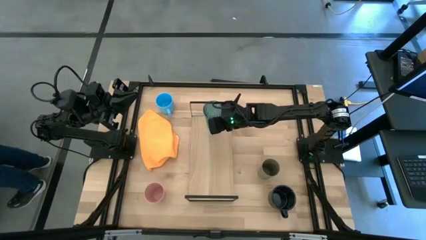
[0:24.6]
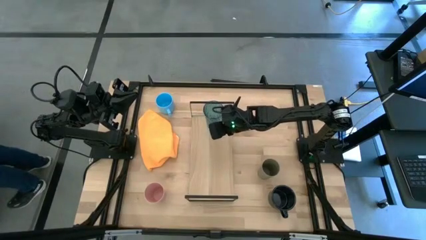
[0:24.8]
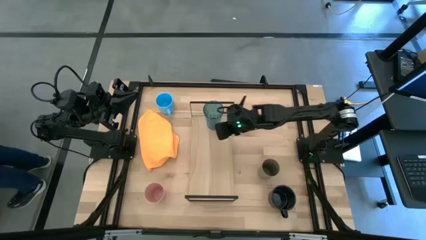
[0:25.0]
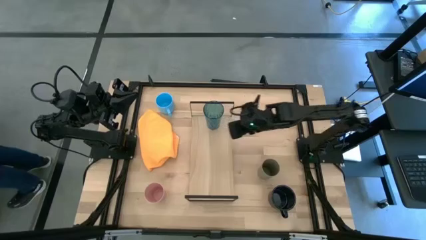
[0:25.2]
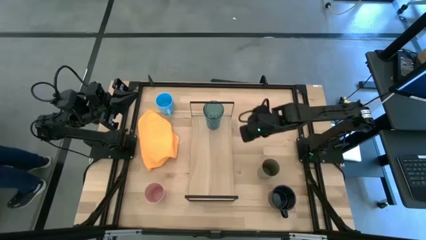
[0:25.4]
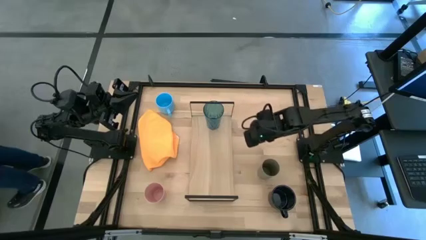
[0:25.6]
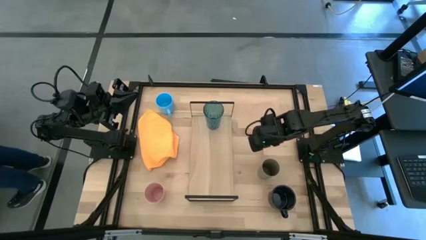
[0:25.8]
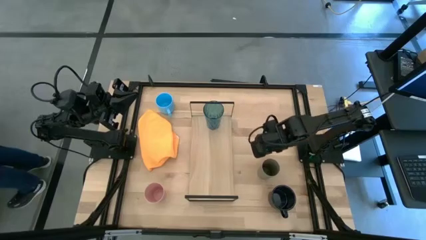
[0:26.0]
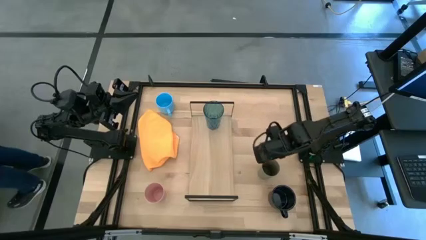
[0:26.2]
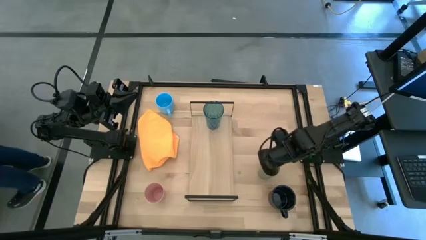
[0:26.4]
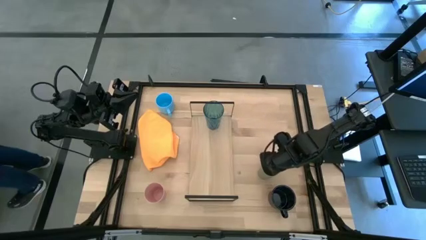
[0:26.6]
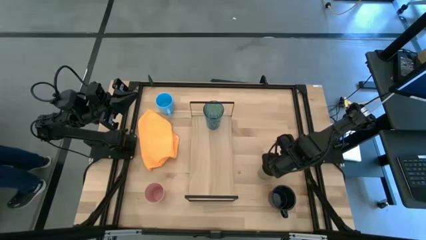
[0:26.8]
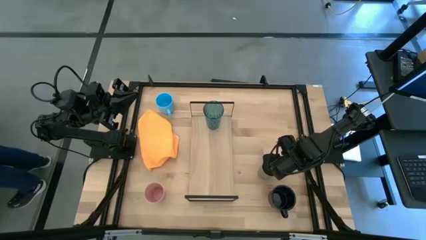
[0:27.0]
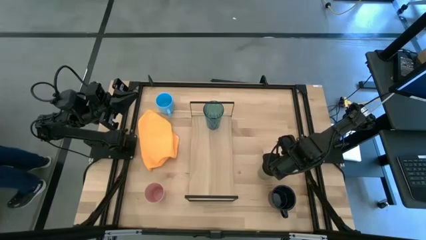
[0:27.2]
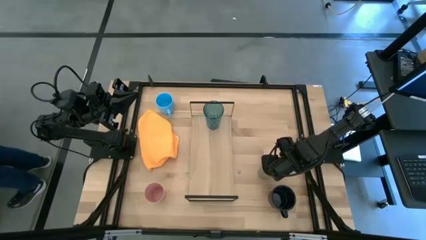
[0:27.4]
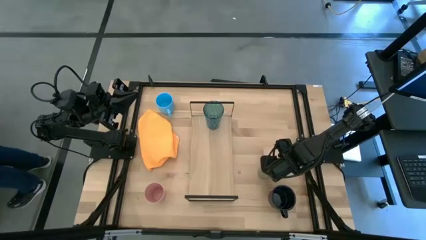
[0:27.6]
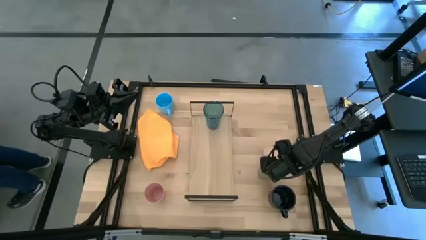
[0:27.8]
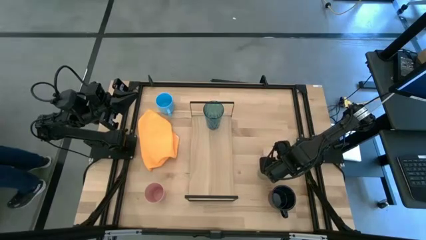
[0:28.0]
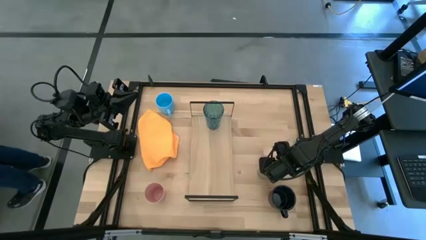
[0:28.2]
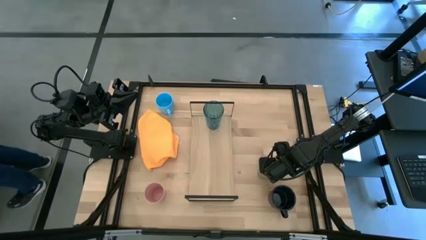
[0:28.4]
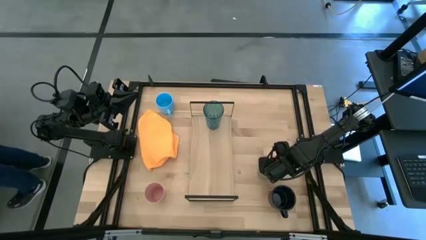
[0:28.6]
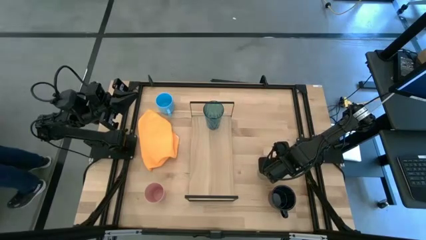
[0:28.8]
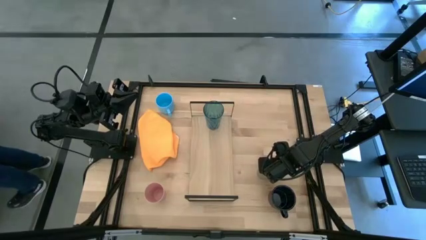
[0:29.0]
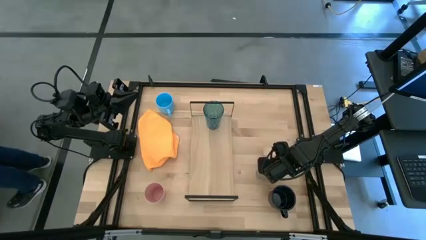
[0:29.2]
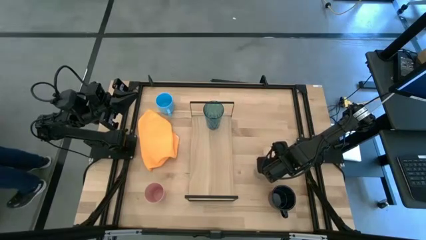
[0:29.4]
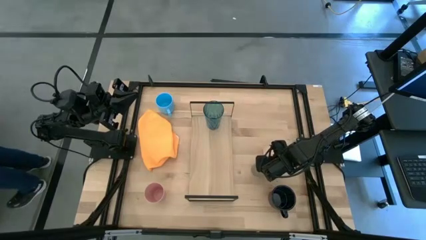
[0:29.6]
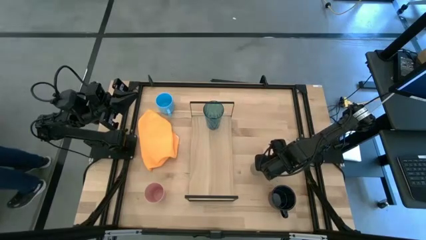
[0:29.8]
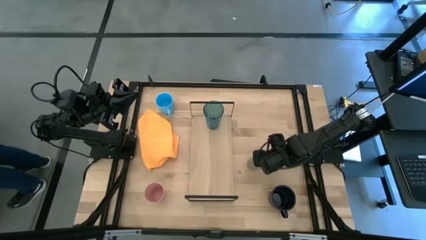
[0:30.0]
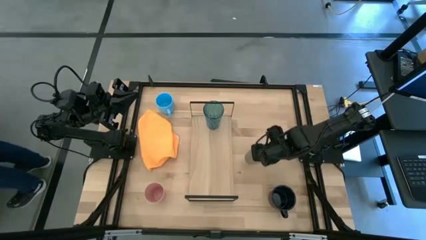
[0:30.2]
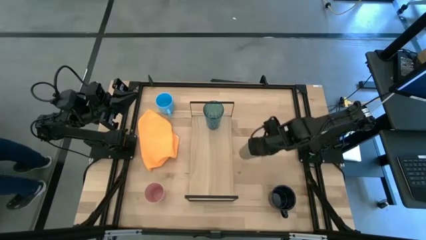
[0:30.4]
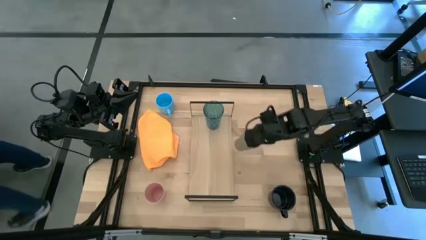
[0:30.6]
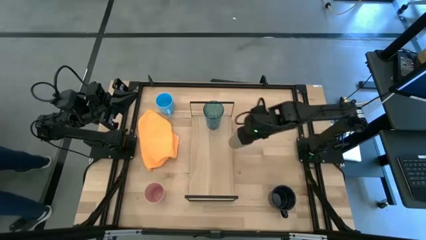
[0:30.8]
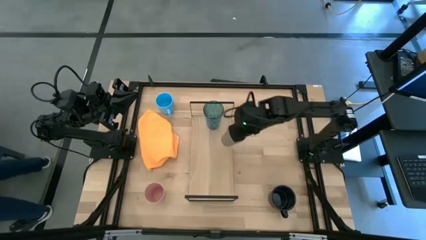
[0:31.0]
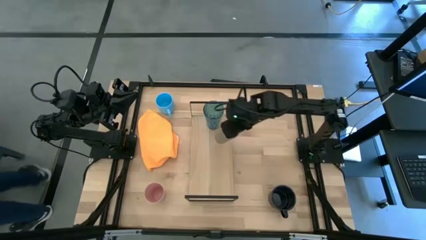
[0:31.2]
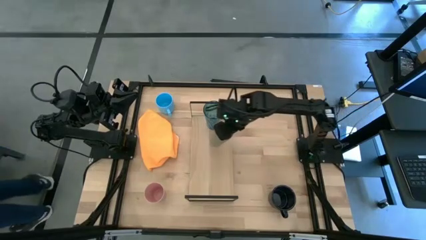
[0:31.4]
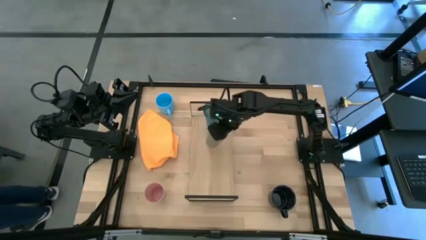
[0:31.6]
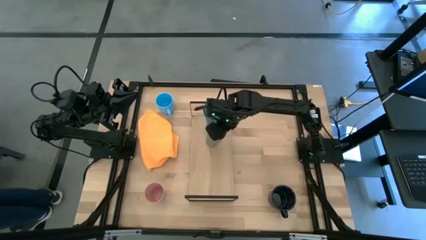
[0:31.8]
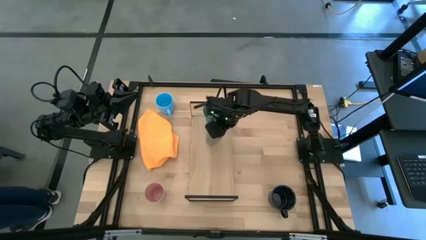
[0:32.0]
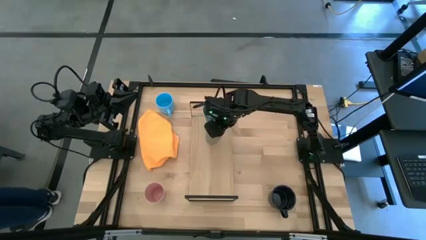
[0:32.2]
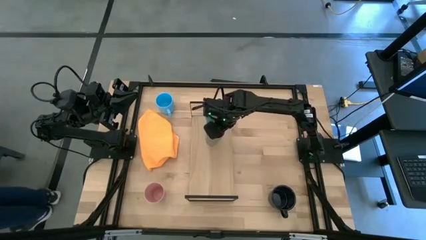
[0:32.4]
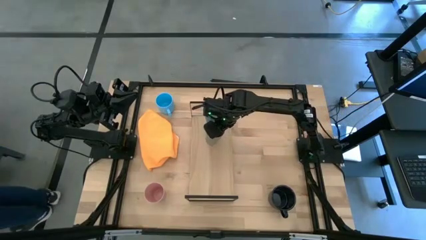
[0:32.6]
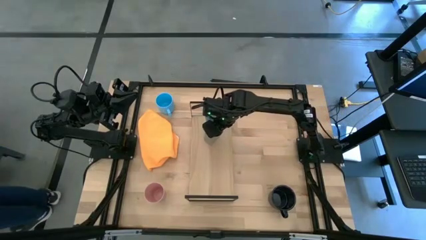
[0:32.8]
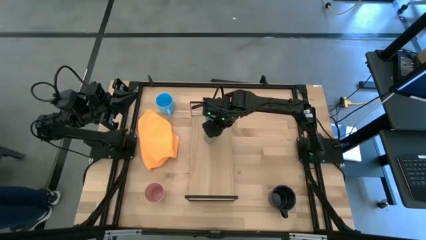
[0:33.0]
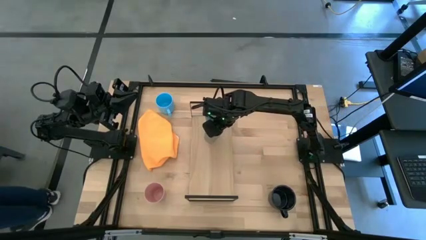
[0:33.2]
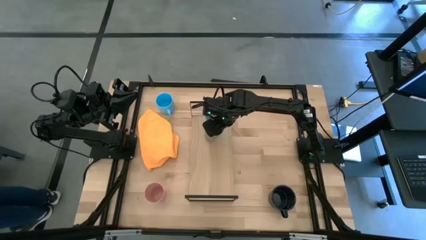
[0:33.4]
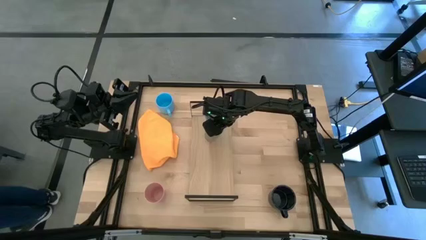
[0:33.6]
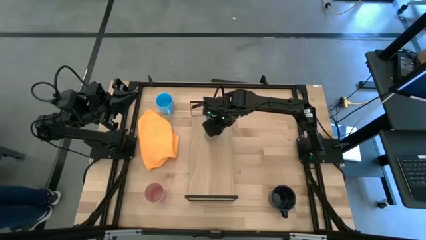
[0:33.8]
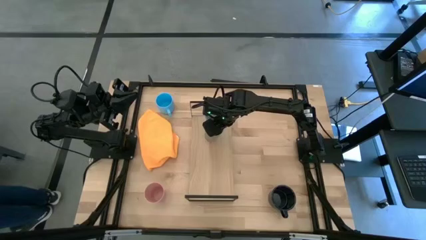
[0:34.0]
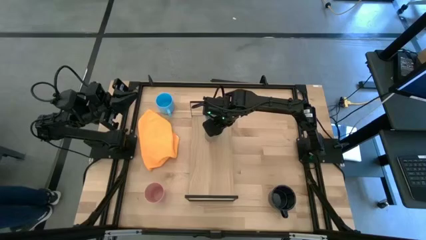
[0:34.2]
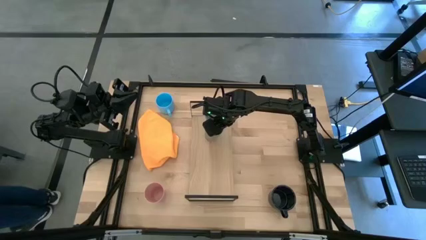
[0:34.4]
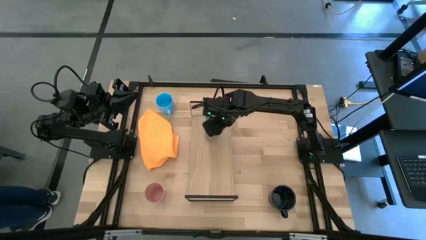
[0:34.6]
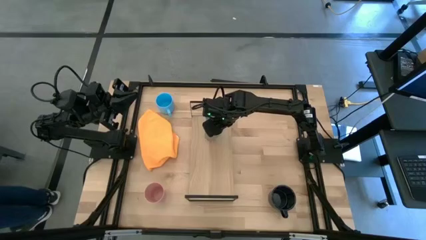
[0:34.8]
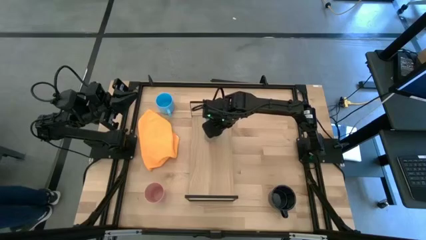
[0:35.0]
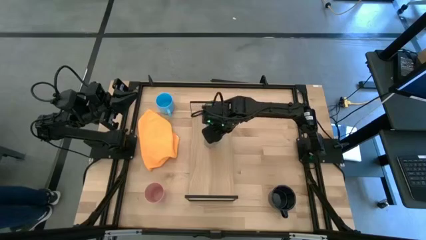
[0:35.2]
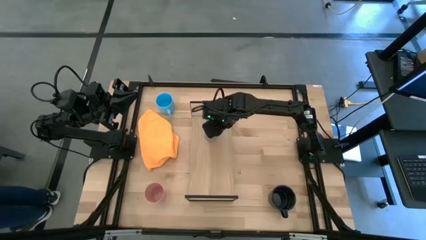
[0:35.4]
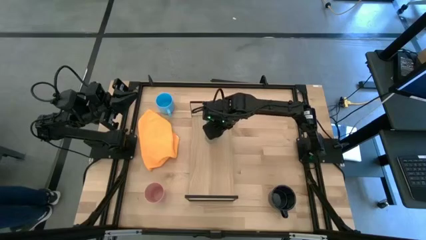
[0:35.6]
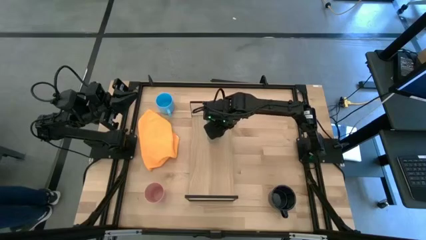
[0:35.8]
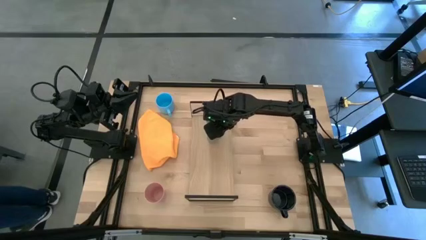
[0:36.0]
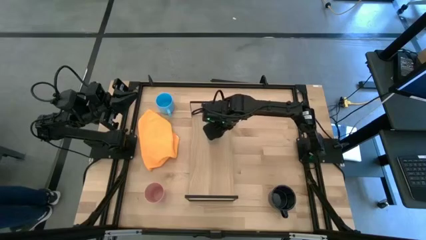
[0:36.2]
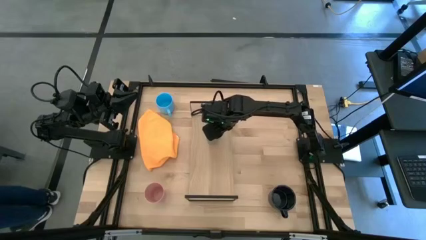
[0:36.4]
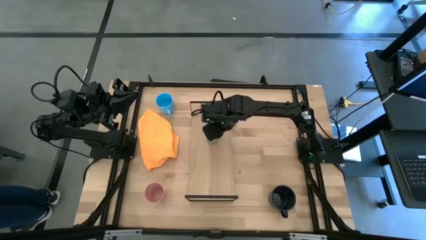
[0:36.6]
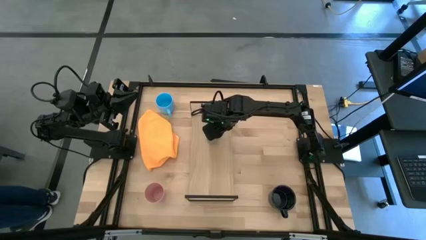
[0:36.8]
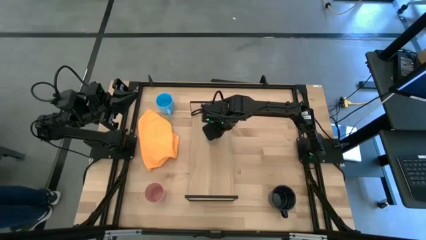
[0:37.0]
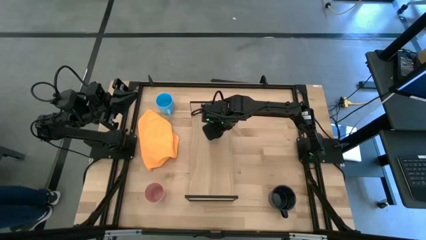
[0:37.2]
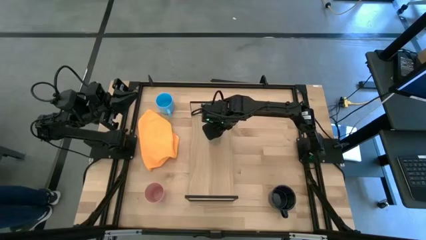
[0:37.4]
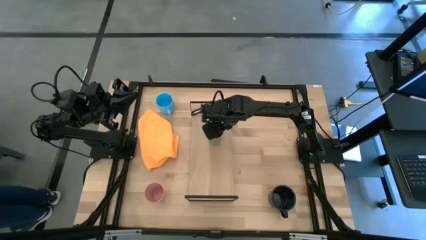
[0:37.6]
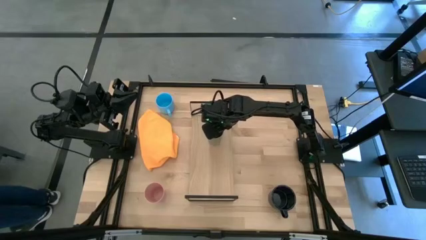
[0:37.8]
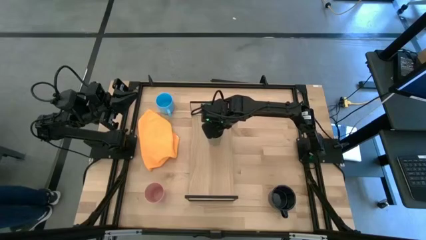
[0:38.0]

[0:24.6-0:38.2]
Task: Stack small to large cups/mugs on shelf
Put the gray cup on the shelf

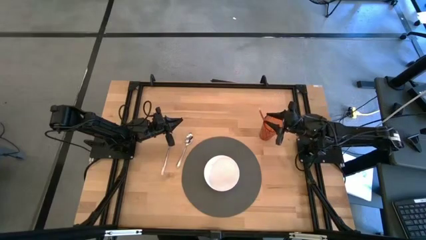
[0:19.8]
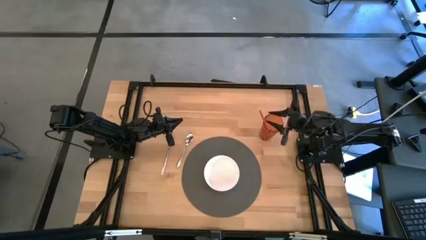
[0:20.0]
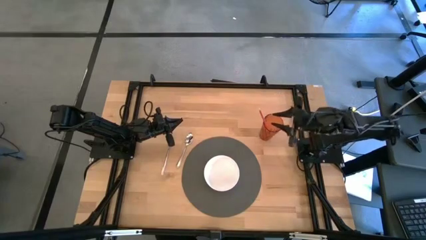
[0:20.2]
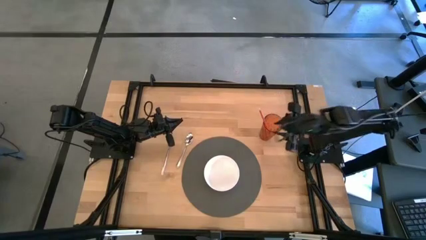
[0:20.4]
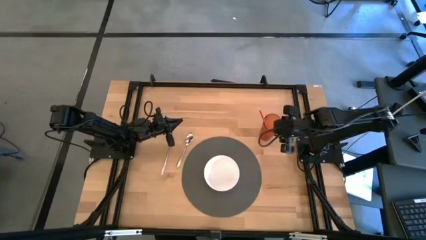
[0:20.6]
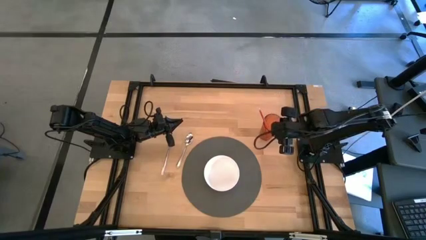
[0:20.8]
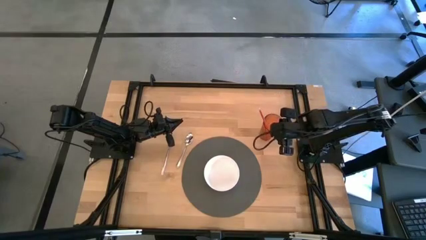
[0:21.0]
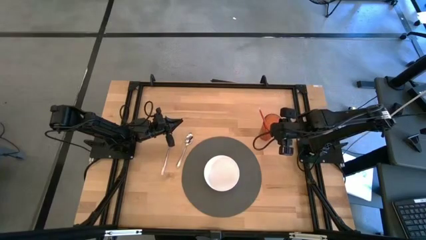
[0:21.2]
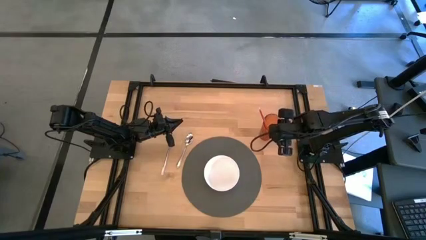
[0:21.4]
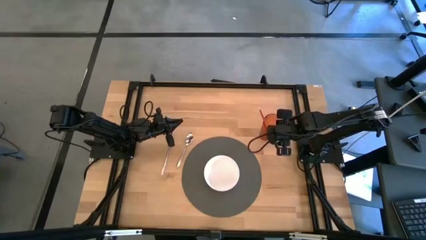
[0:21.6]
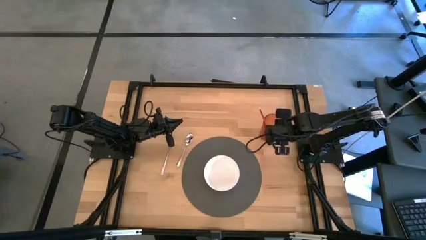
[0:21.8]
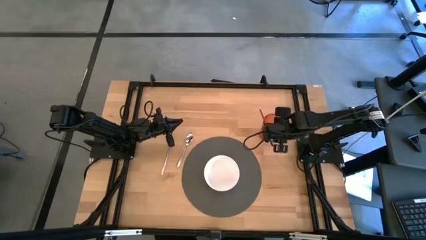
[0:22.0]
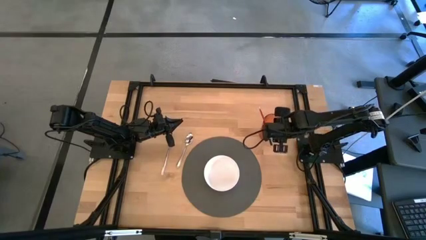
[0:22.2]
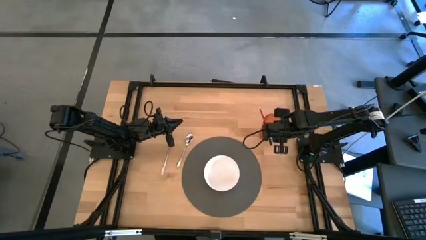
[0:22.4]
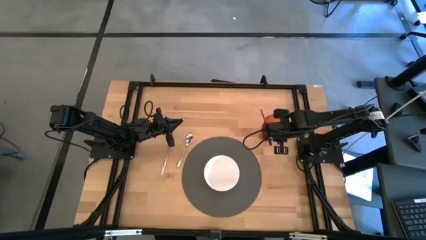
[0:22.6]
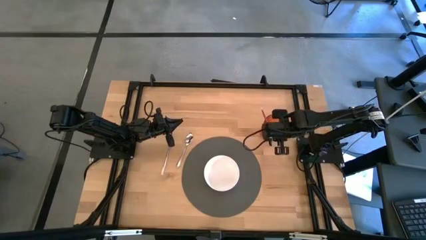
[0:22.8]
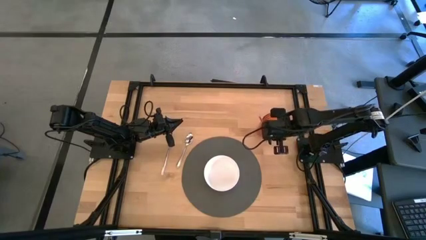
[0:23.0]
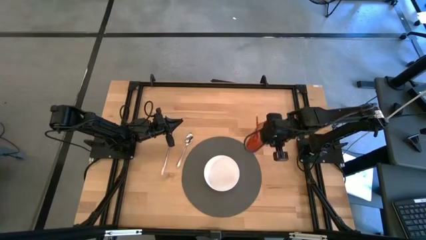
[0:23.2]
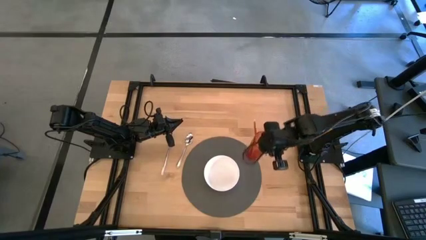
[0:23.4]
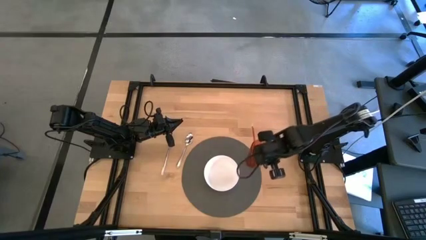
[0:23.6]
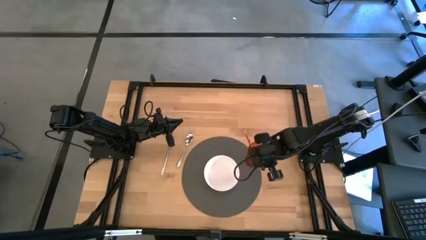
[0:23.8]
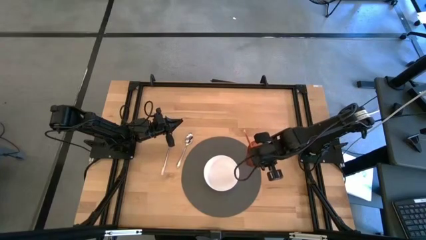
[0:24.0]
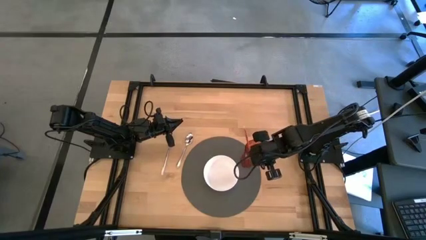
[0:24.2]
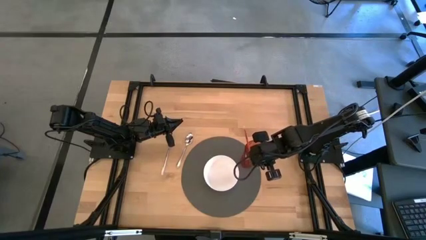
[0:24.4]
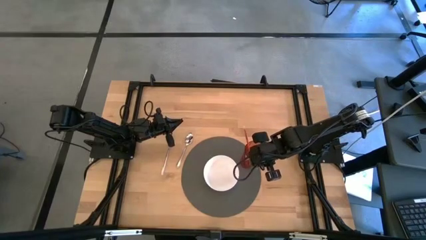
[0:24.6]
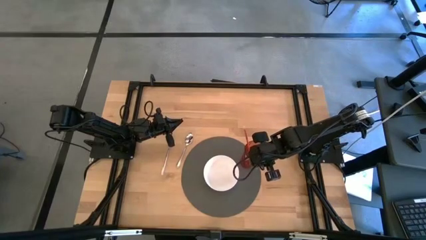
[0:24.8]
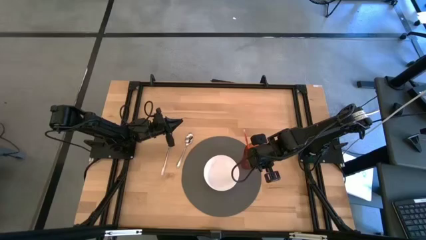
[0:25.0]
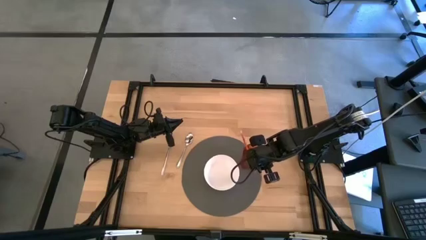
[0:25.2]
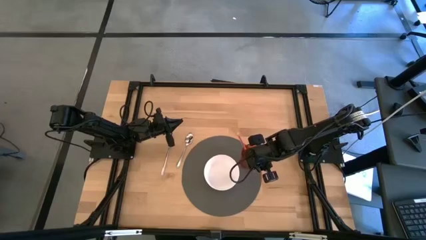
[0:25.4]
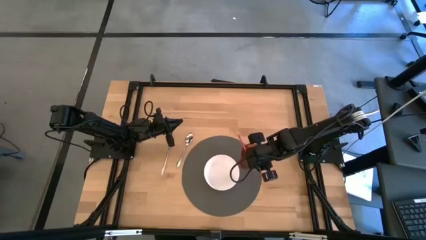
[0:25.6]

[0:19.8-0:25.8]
Task: Pick & Place Utensil
Put the brown cup on the gray mat to the top right of the white bowl
